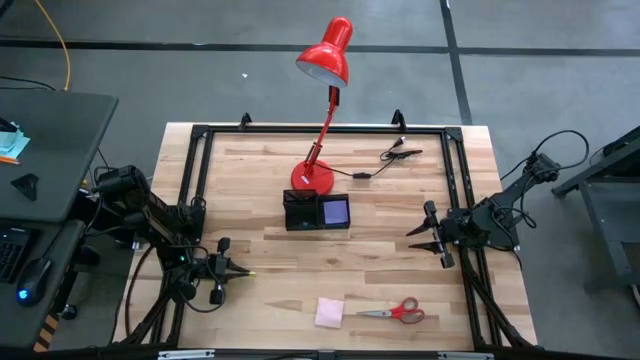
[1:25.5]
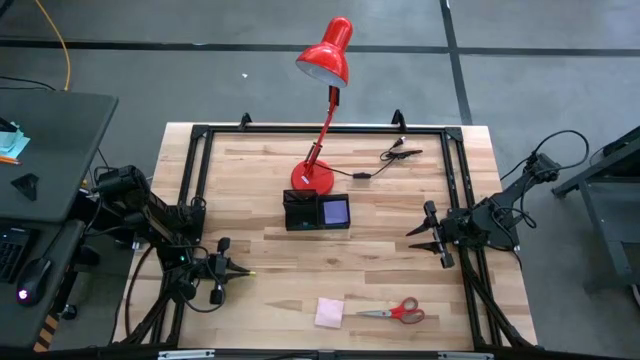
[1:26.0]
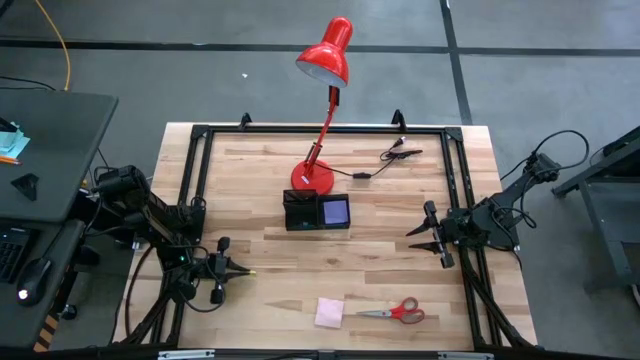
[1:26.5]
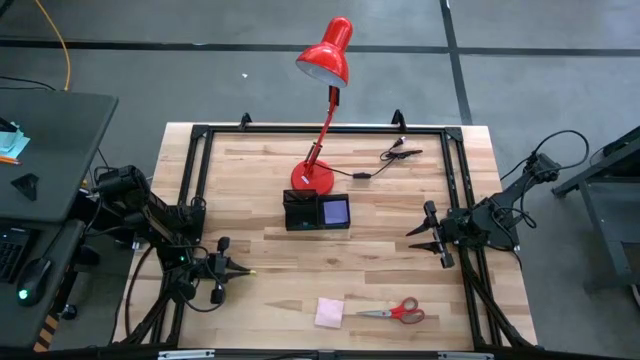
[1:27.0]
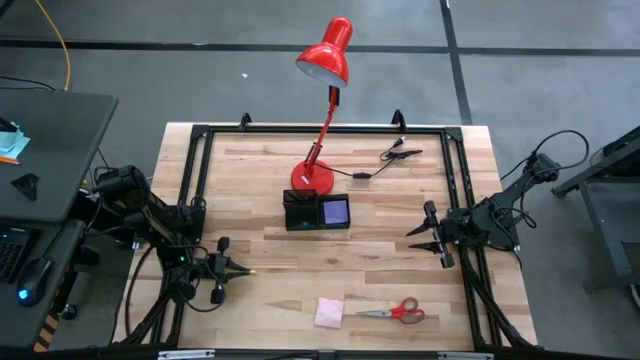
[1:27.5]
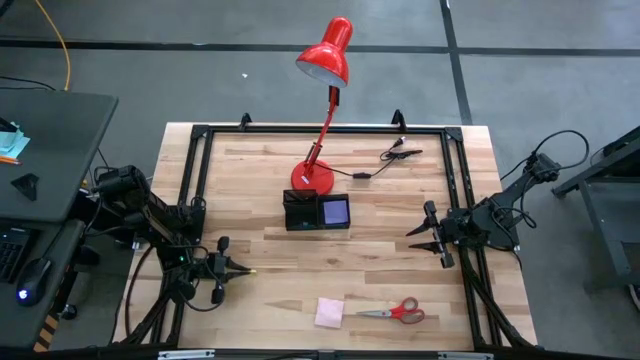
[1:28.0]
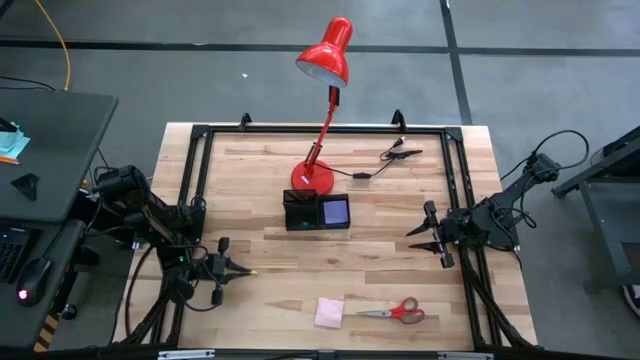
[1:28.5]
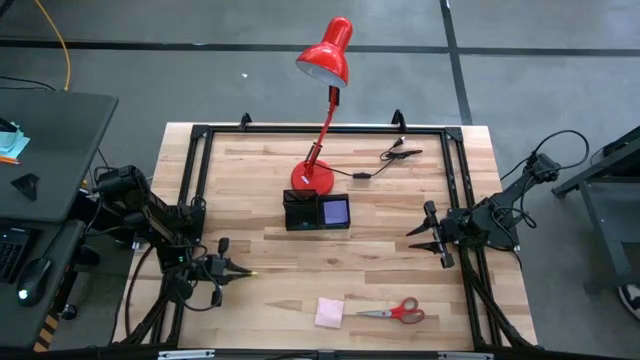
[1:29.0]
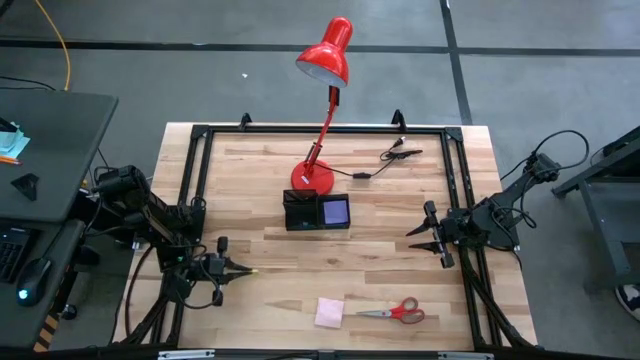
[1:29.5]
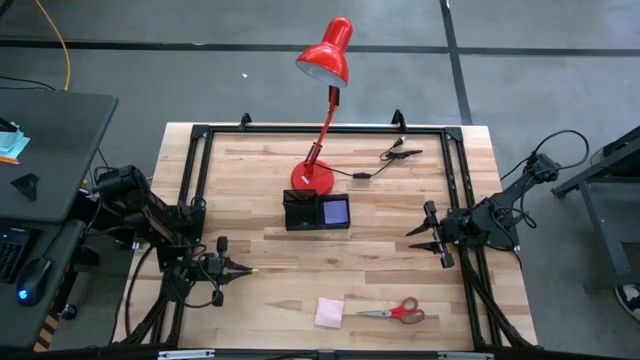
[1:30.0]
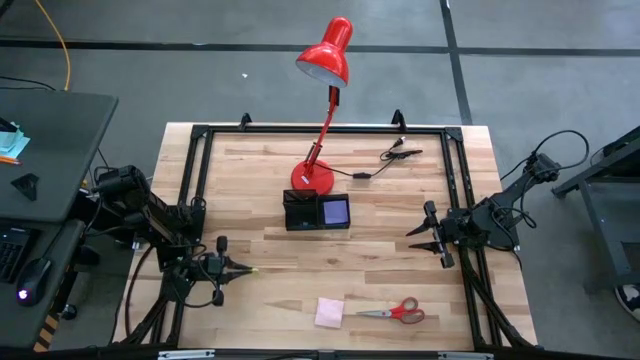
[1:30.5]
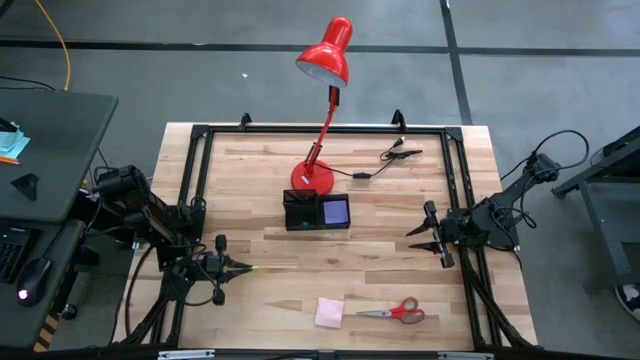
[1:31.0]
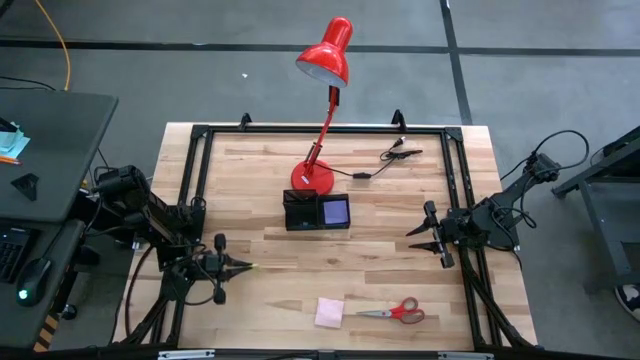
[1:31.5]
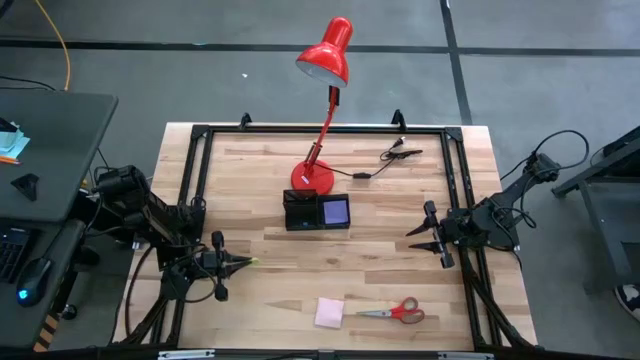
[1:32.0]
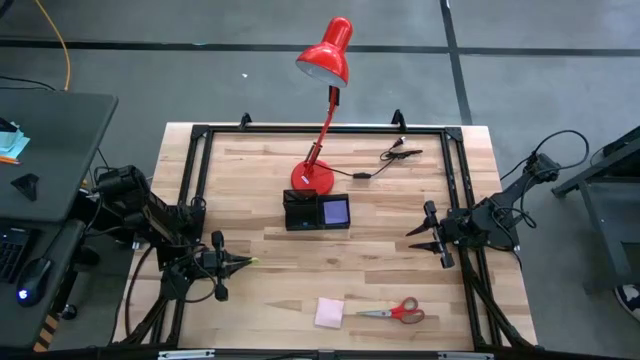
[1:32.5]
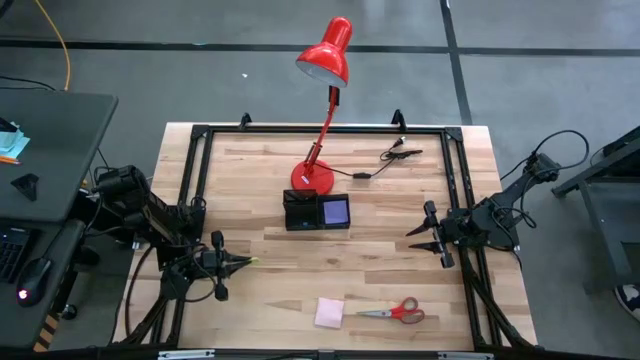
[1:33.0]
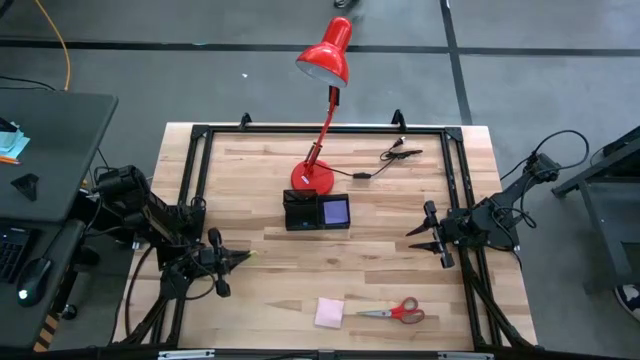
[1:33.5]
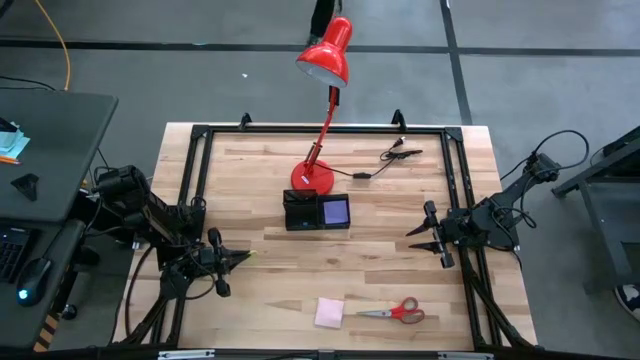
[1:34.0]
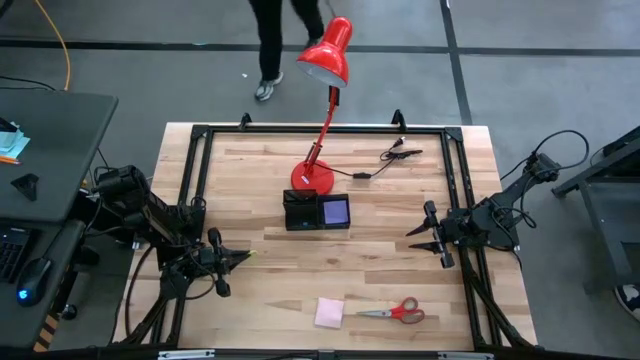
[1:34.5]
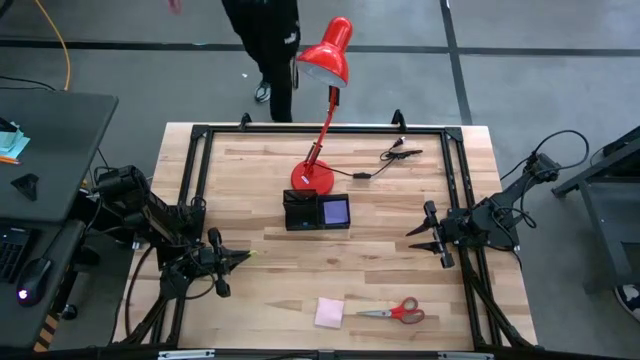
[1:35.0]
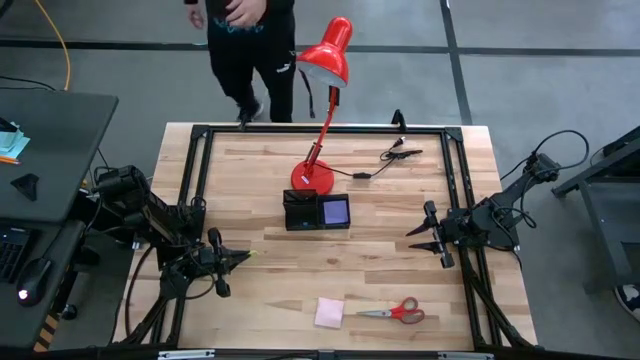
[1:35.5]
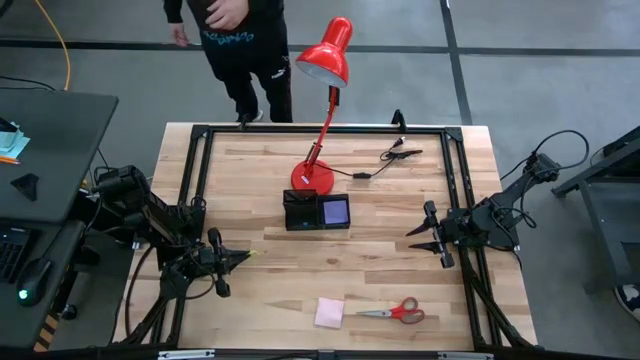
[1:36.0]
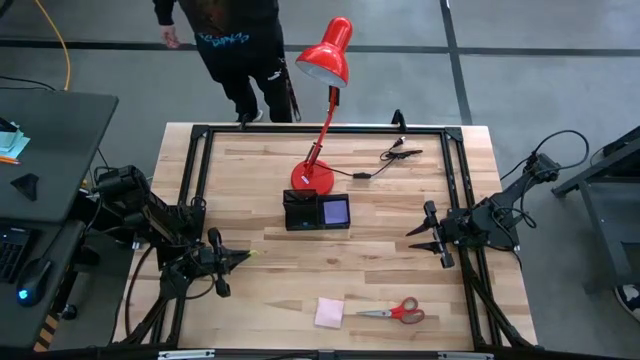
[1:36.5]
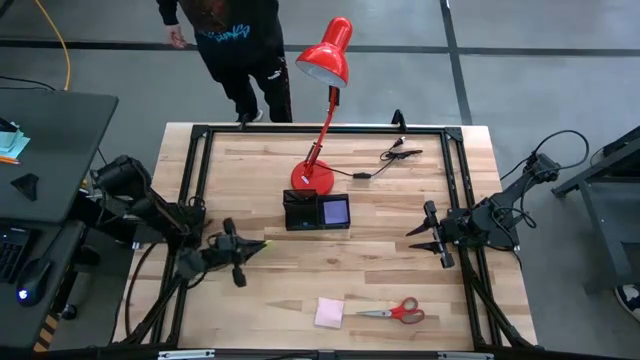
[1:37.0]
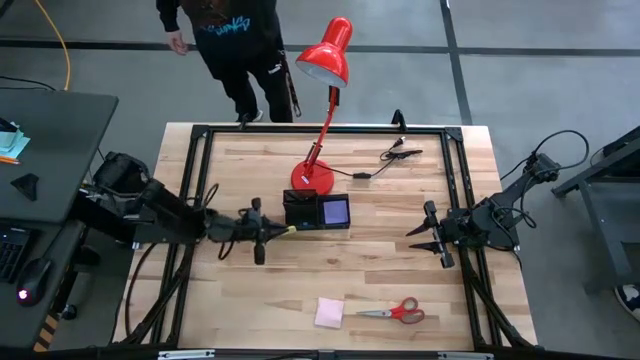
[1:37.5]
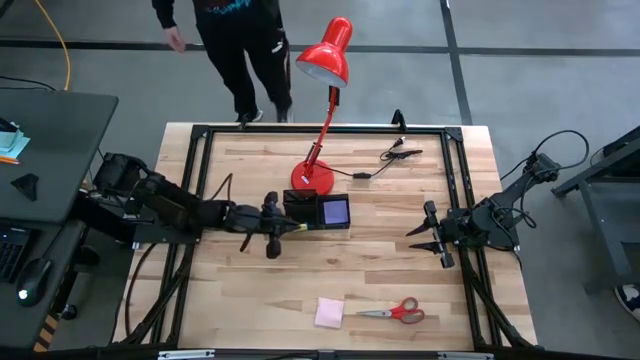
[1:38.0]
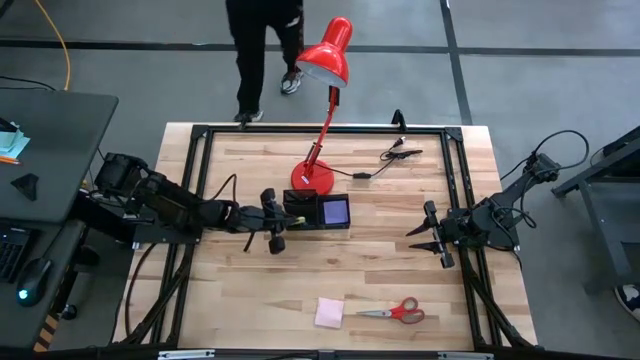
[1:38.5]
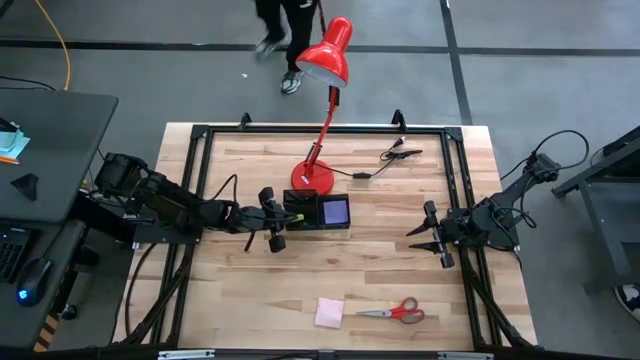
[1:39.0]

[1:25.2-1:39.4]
Task: Pick and place office supplies into organizer
Put the green eraser into the black desk organizer

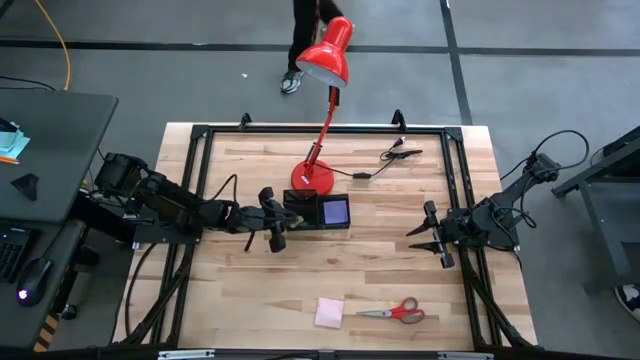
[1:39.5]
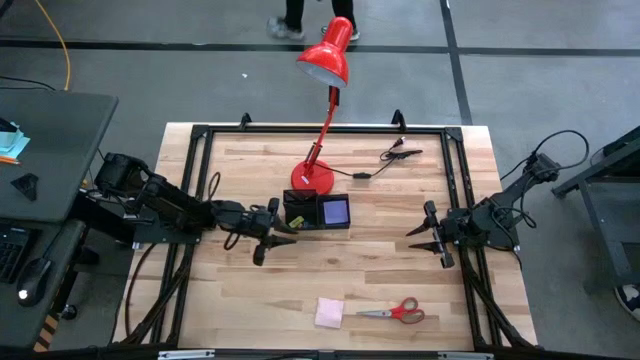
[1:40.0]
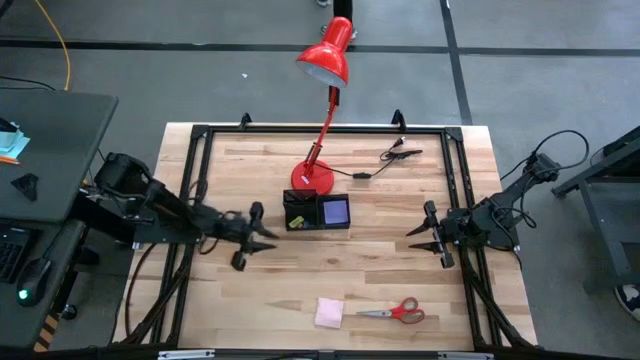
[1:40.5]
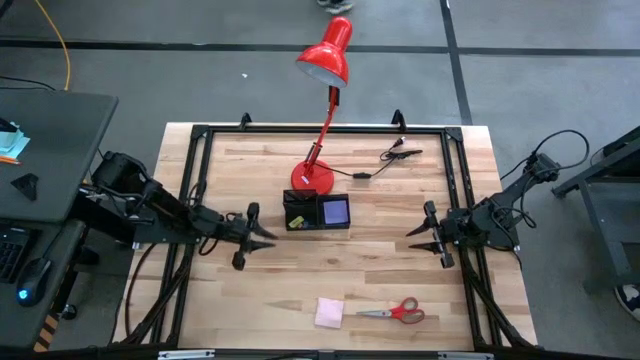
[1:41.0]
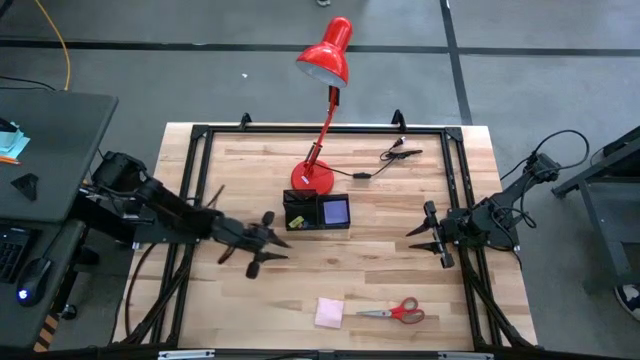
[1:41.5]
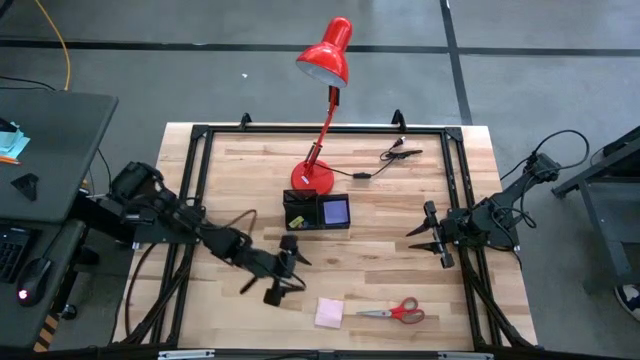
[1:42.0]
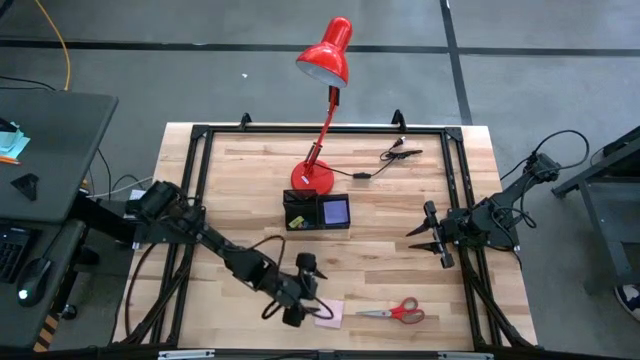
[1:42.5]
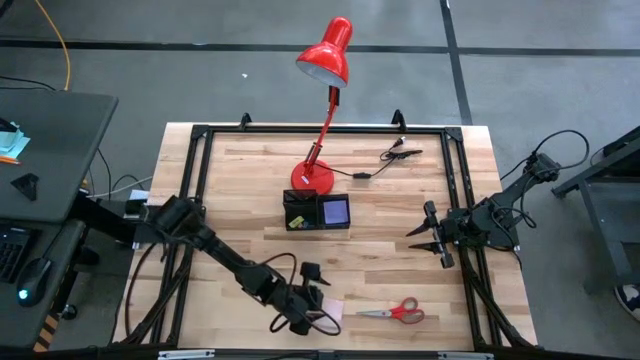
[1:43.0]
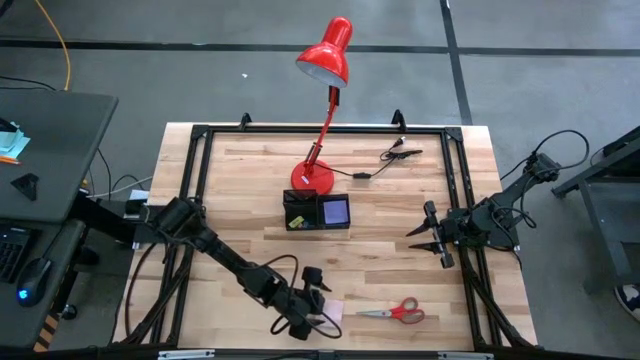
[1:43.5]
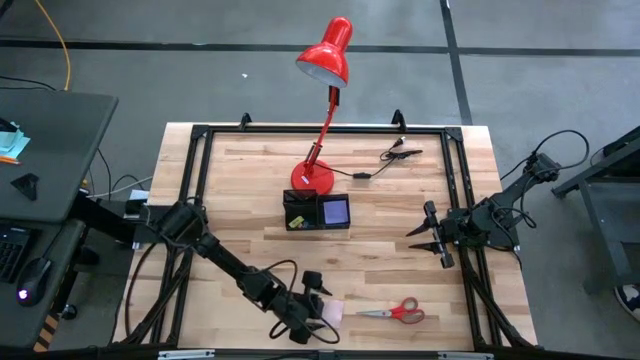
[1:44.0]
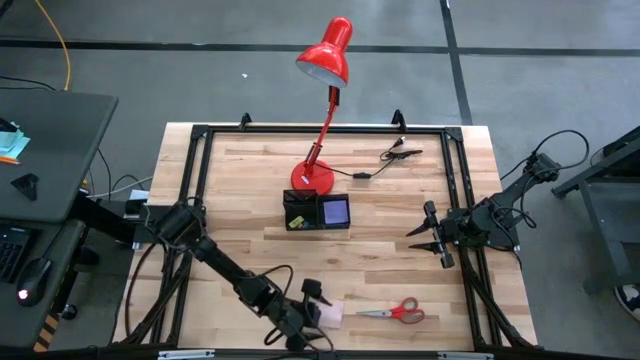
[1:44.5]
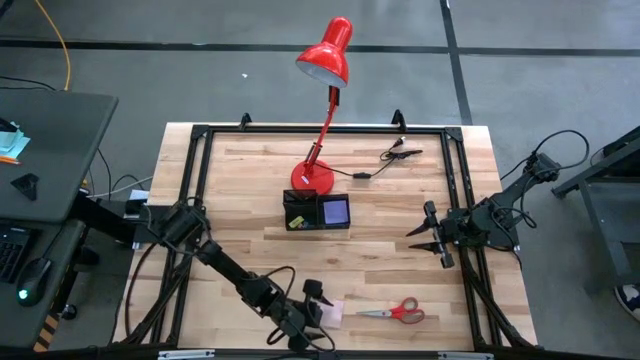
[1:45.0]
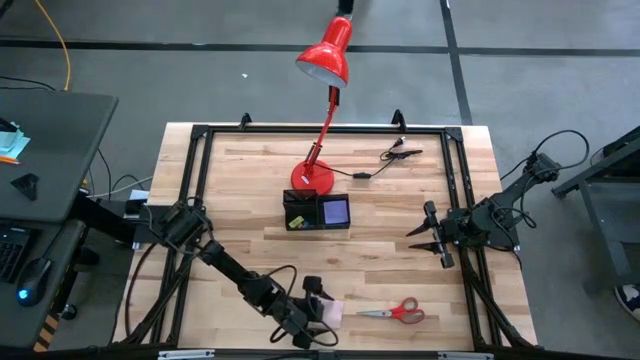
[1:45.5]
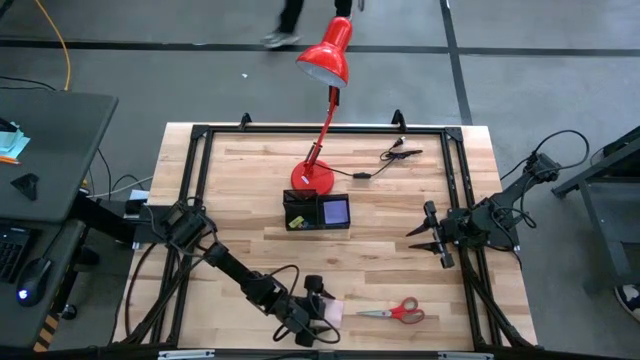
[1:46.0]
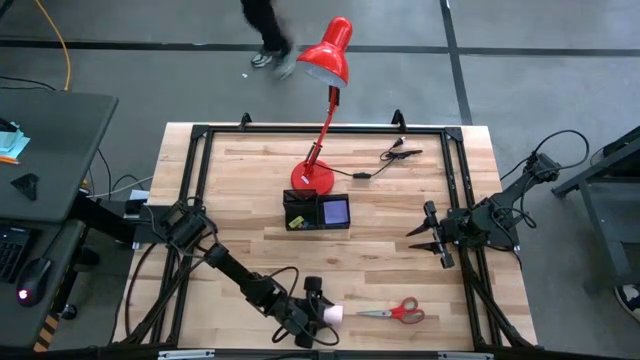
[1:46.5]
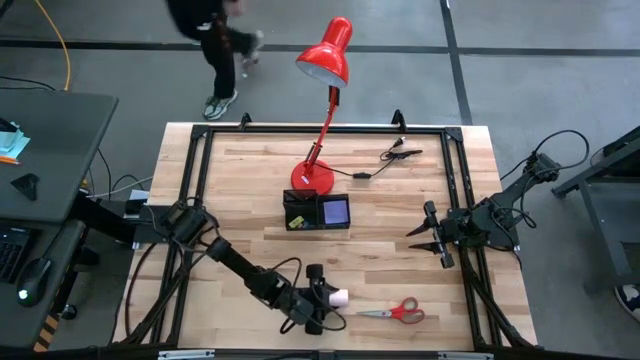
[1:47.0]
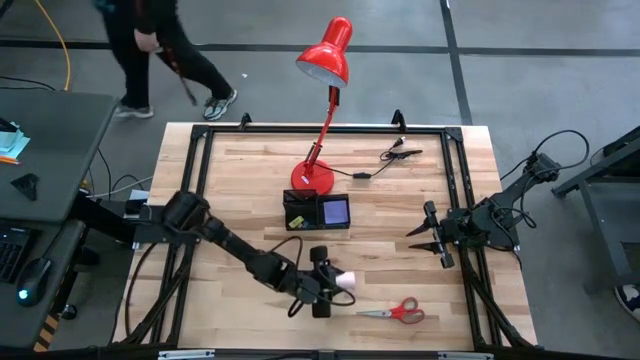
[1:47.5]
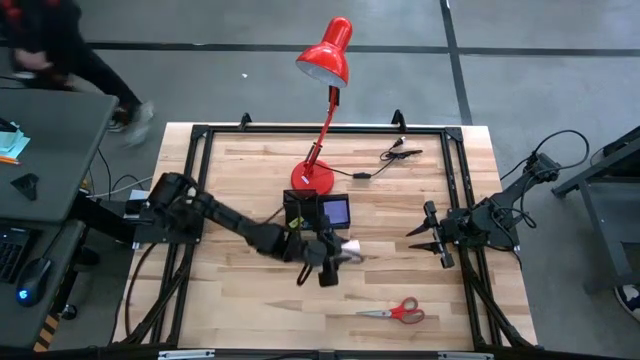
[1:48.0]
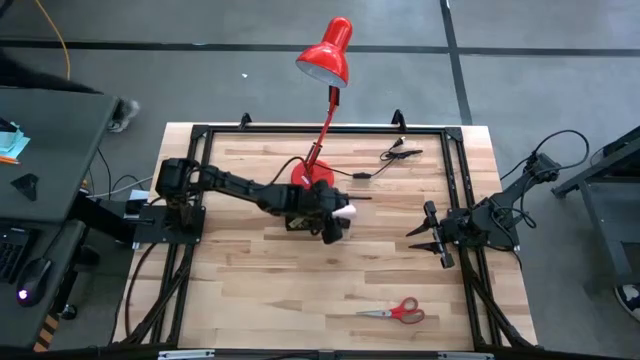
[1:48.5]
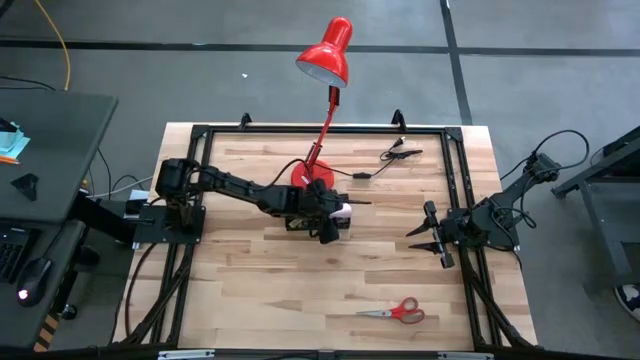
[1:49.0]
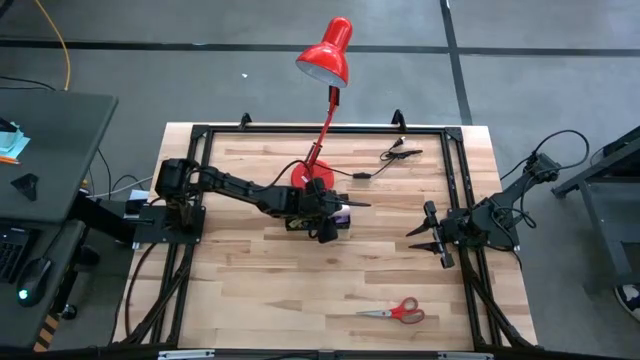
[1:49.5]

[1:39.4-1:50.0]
Put the pink sticky notes into the black desk organizer
